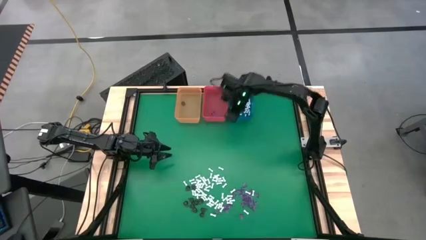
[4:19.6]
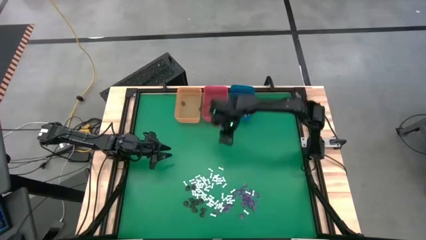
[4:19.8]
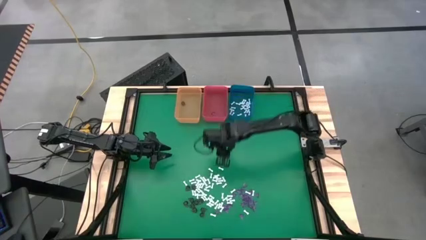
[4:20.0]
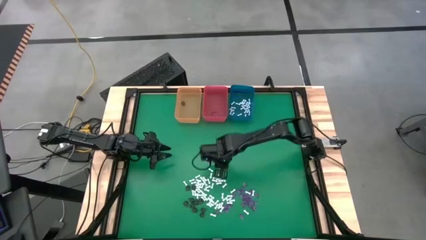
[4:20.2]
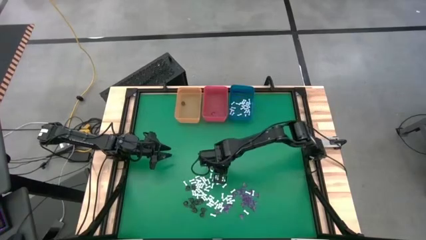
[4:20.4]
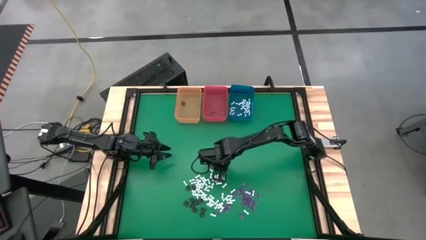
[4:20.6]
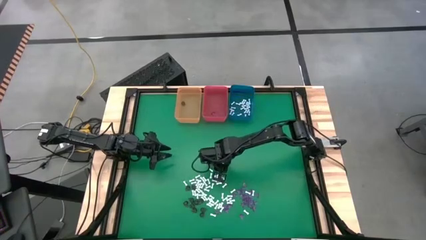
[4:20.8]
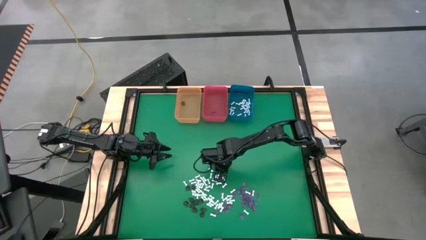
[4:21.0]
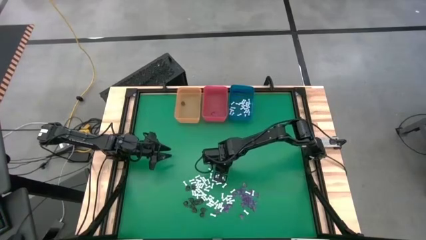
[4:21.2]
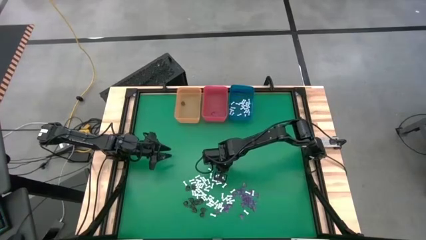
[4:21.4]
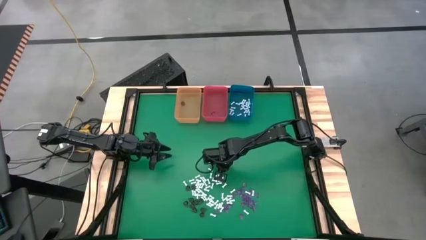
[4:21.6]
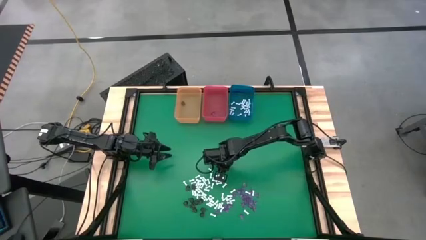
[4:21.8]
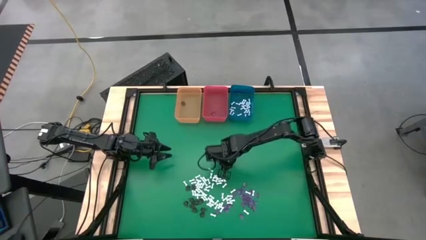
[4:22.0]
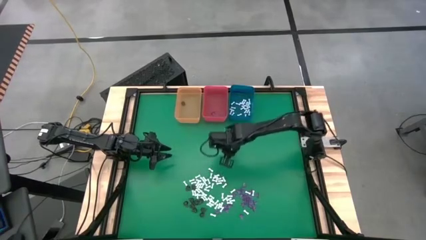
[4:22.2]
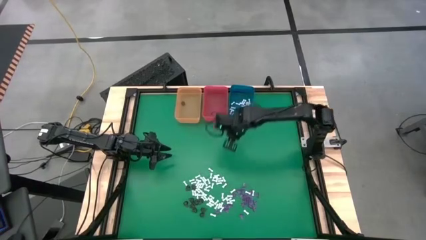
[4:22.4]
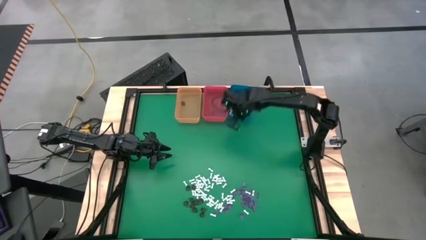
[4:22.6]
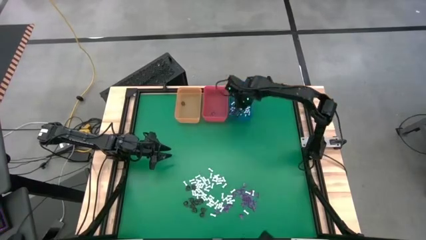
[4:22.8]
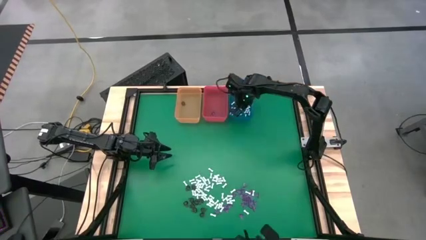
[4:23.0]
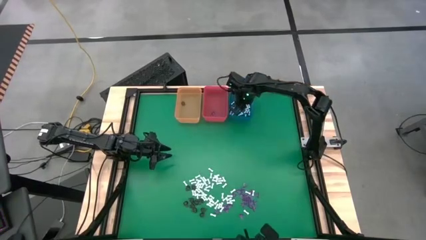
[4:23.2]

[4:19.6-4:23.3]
Task: Sort Halloween decoration
Put the white bone toy into the blue bin

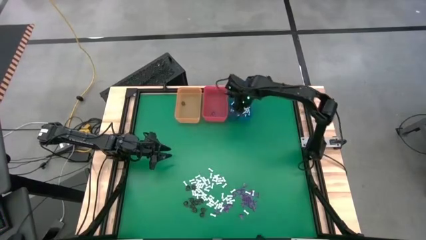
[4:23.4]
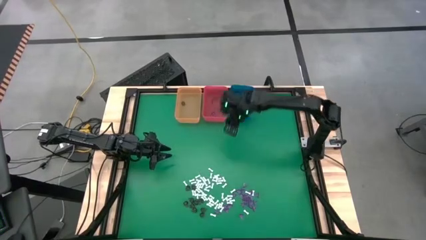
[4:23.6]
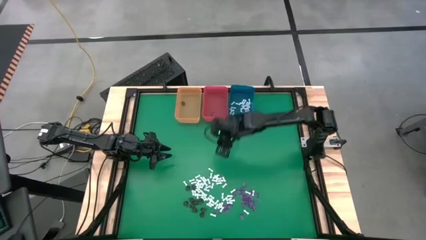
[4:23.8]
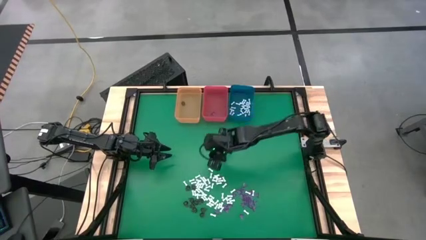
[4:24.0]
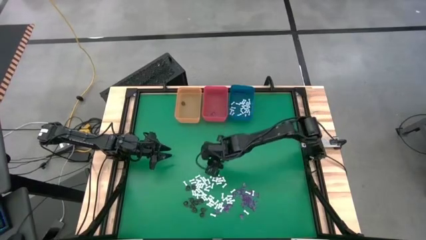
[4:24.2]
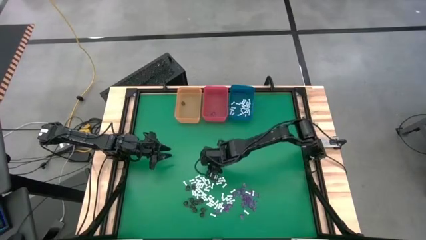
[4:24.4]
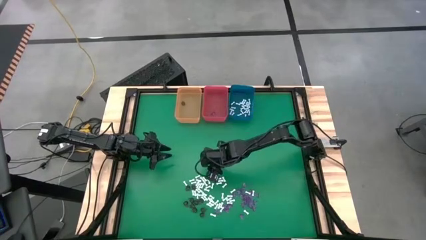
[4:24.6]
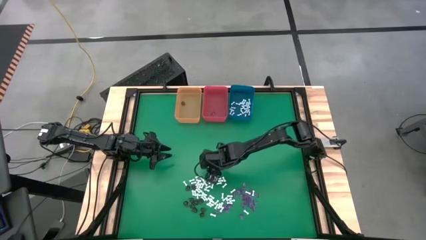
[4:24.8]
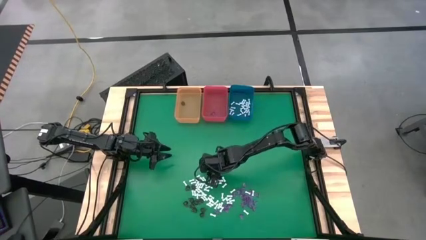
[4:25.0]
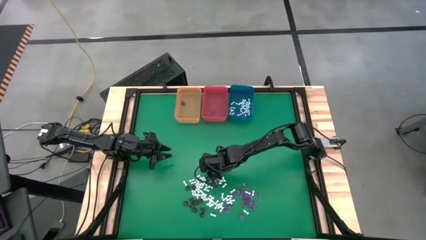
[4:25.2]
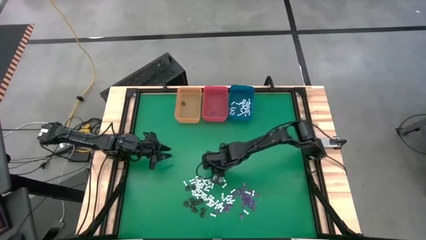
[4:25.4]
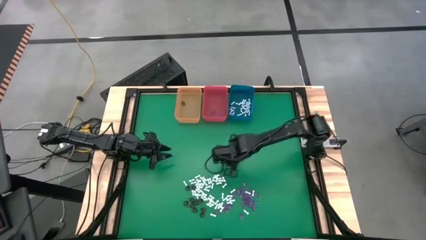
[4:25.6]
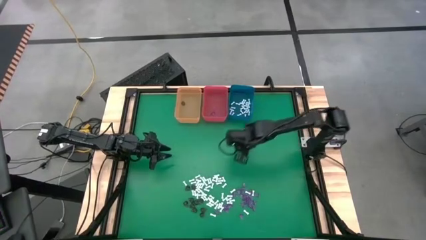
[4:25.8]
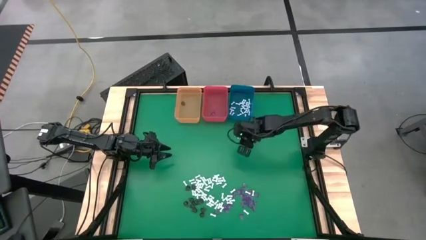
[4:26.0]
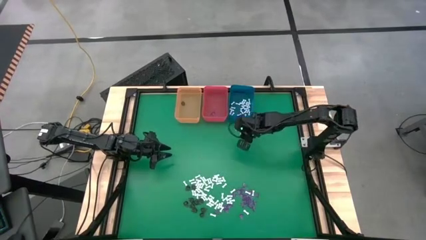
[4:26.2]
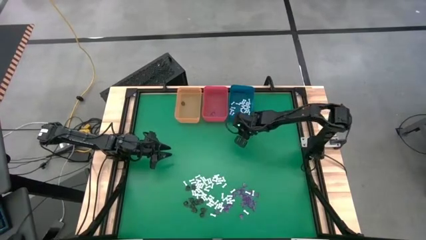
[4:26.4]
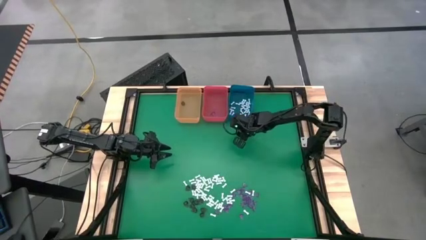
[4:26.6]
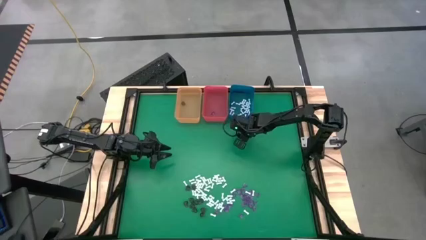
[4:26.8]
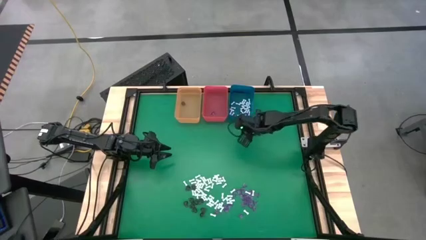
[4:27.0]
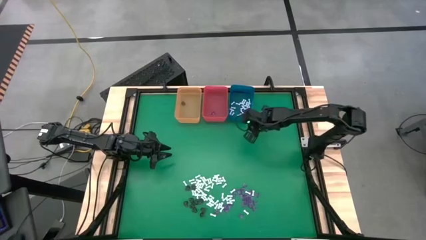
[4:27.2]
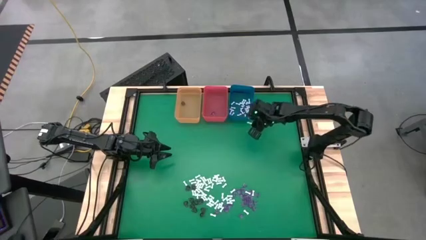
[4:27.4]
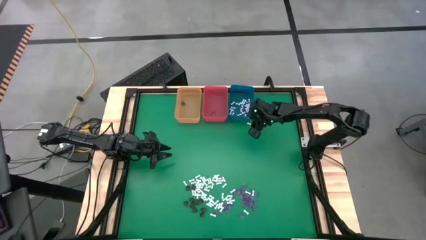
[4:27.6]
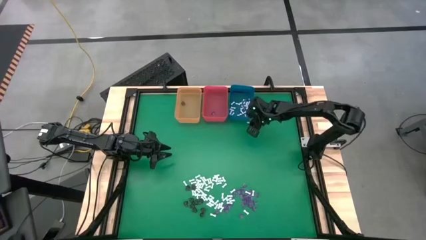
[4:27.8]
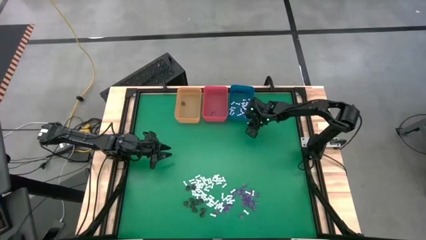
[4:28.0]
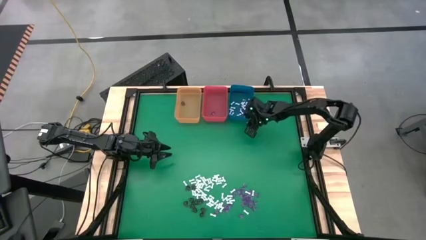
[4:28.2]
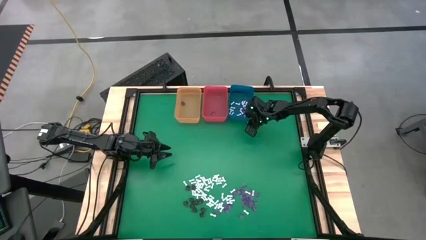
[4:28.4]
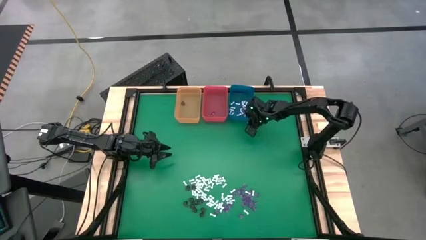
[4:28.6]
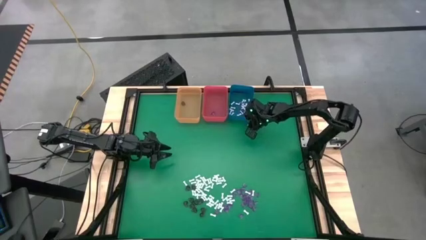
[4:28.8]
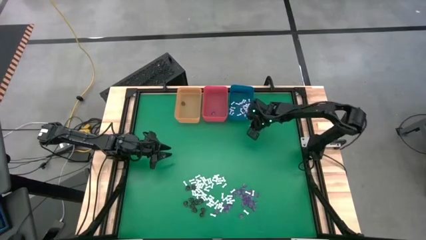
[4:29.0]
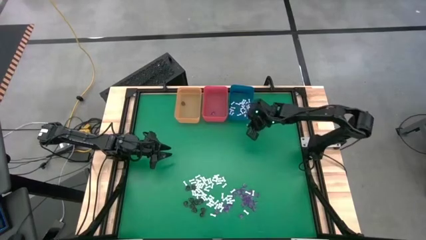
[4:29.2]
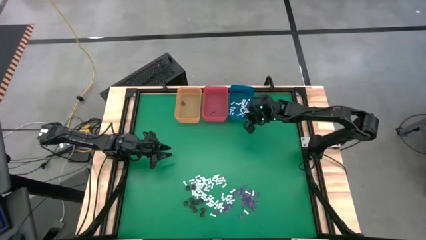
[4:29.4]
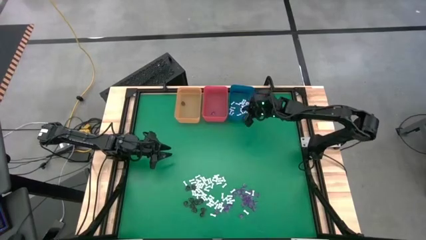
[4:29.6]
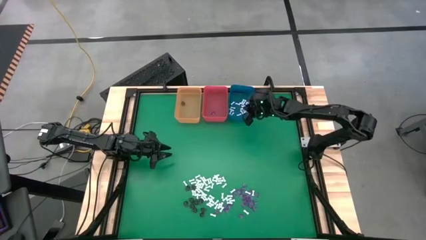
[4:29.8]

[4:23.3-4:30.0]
Put the white bone toy into the blue bin

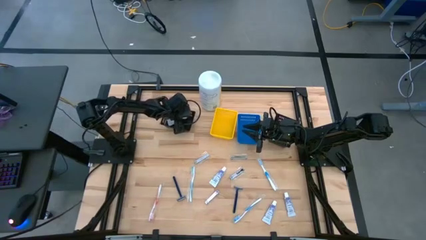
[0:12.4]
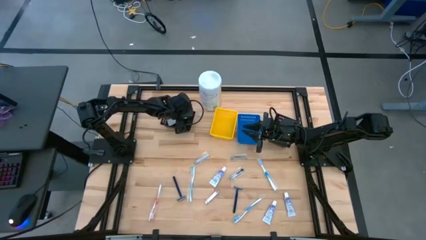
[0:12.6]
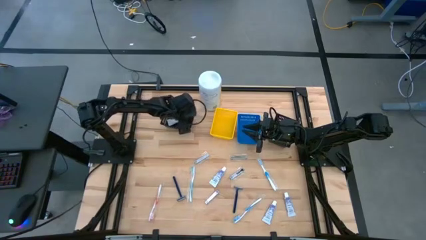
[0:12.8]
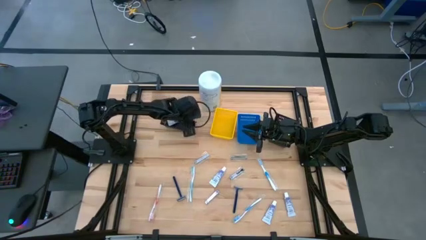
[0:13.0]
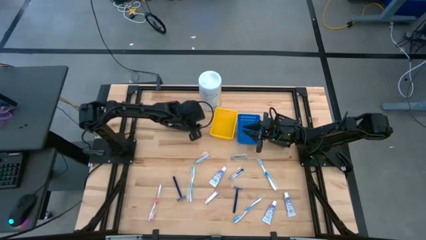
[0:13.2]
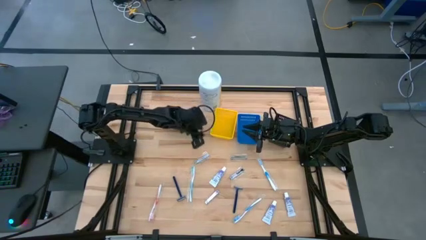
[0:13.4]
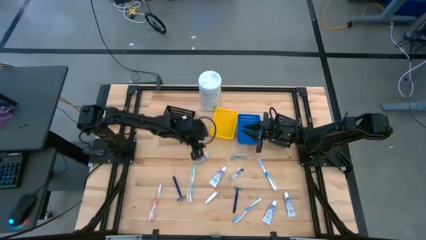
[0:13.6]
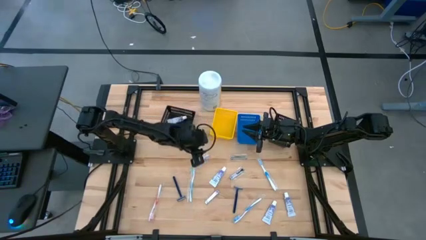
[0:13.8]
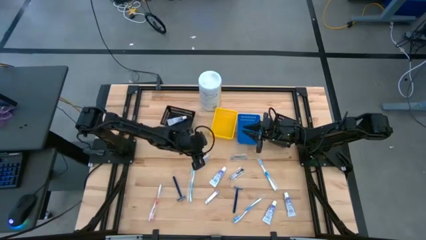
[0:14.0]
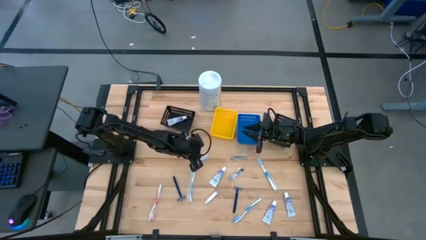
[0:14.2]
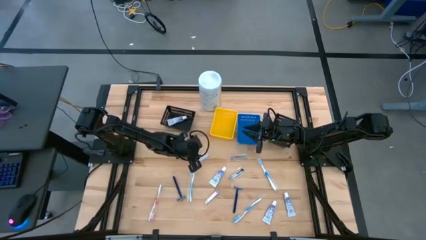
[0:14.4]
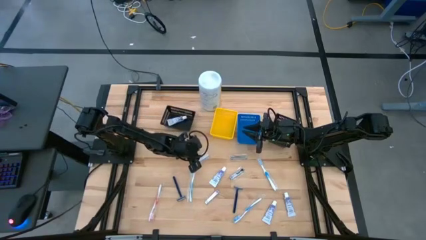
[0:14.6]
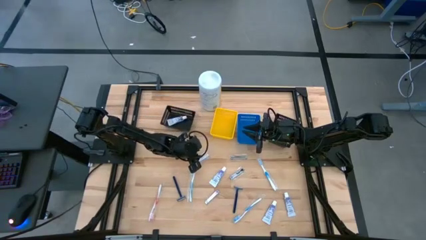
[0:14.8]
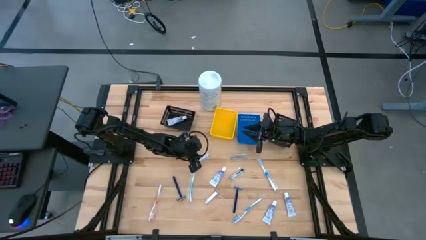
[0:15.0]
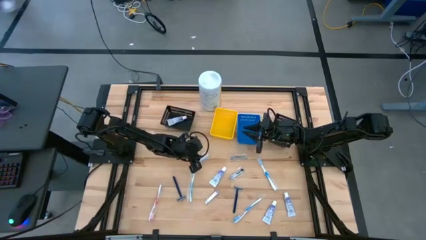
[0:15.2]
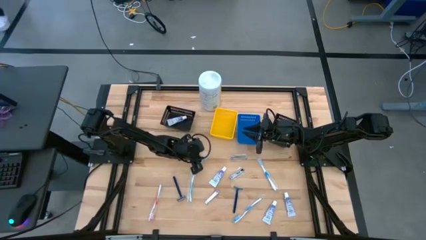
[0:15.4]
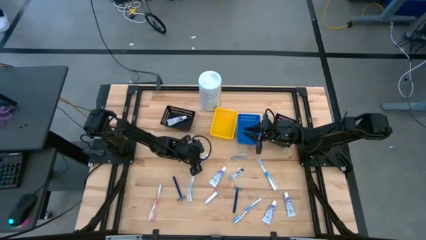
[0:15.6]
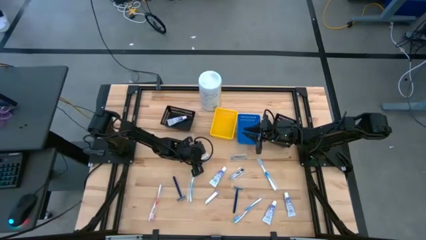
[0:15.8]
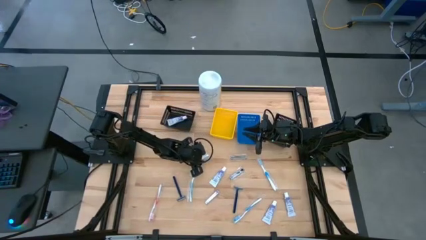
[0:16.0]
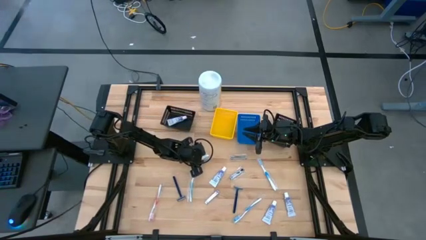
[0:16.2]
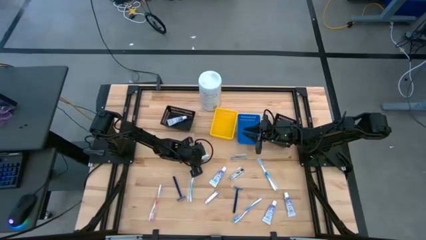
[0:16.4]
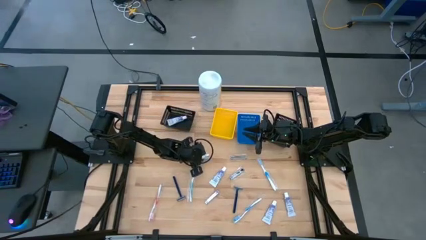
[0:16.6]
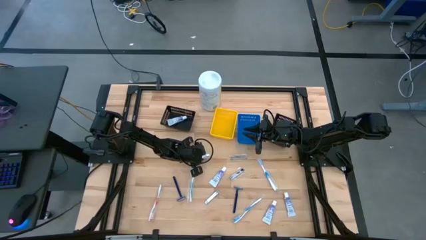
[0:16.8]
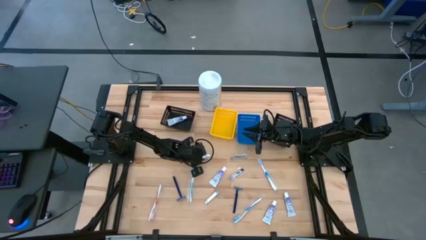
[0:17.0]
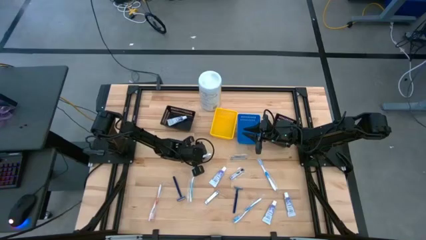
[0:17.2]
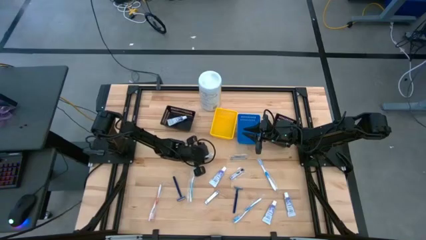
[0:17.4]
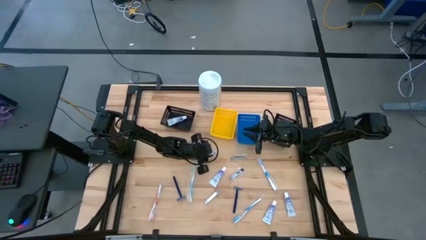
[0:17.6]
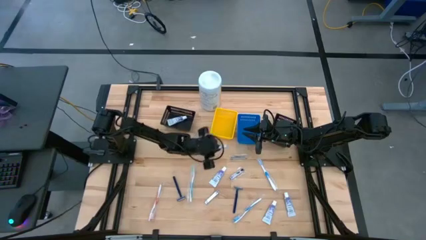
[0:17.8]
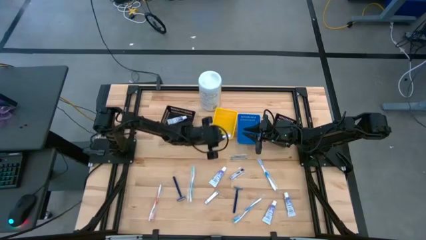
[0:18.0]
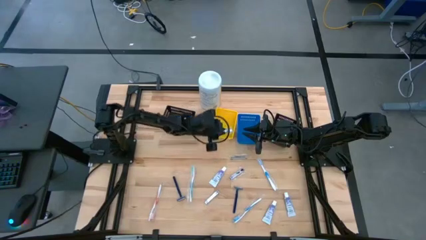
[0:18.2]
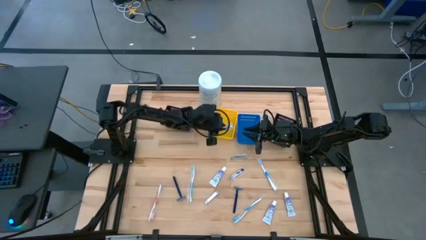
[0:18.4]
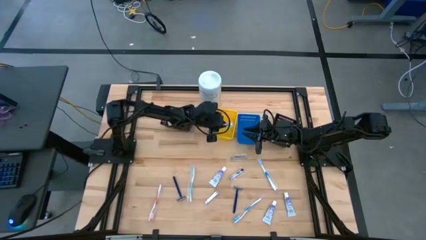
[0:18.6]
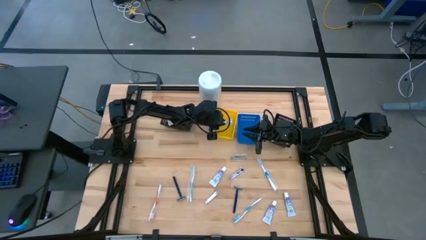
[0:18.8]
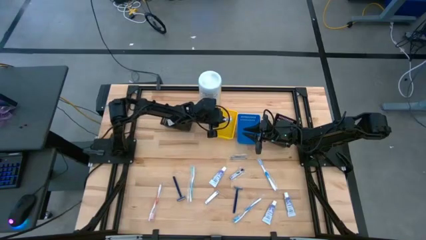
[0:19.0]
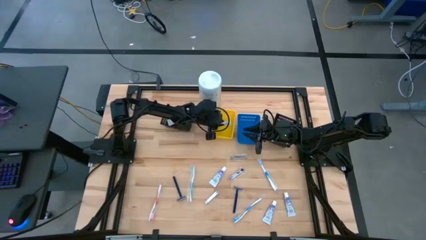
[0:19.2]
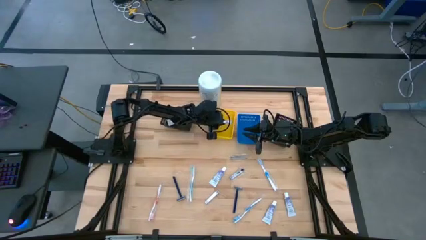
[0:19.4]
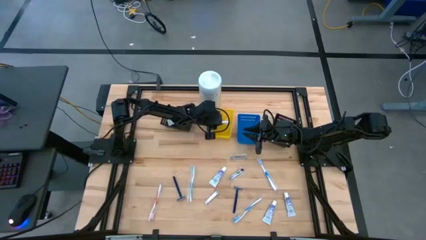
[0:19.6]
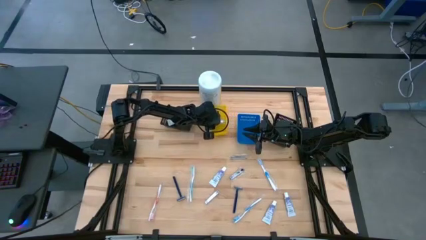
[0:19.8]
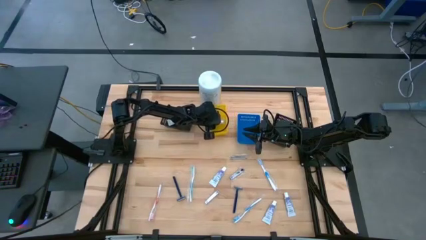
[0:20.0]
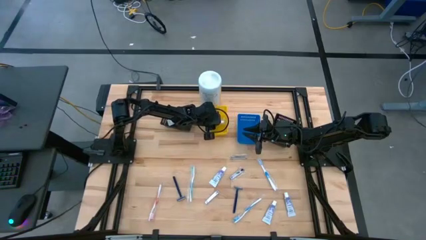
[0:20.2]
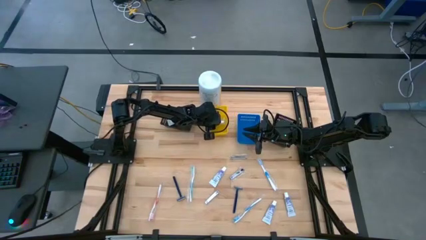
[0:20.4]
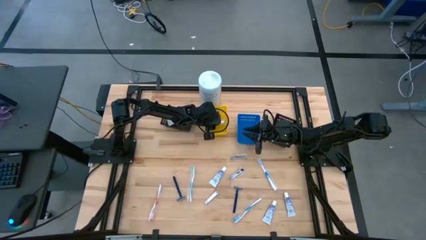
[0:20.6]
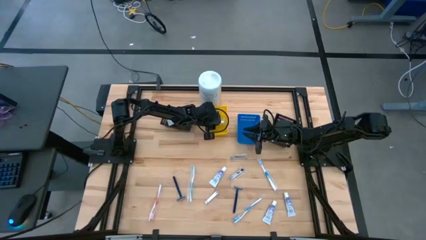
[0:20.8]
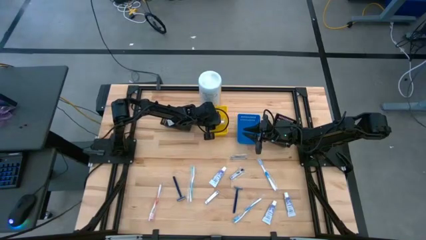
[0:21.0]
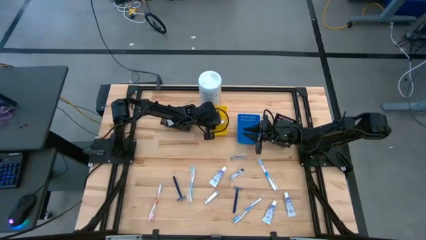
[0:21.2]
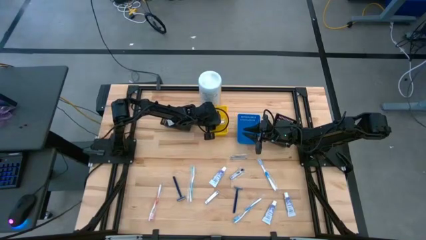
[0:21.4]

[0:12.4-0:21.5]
Task: Pick & Place Travel size toiletries
Put the silver nail cutter into the yellow bin
